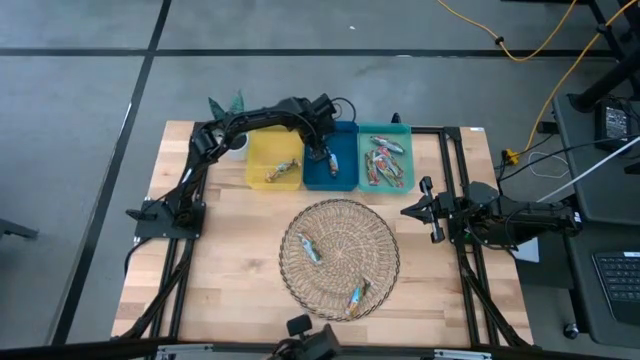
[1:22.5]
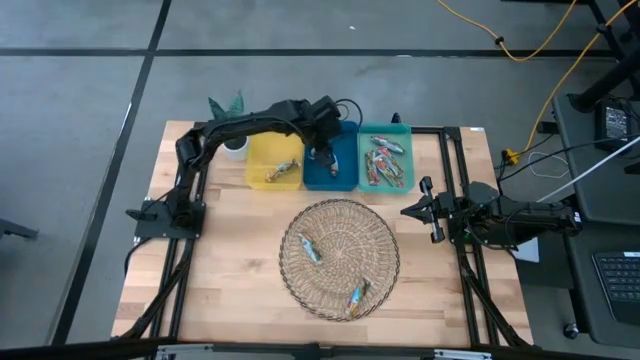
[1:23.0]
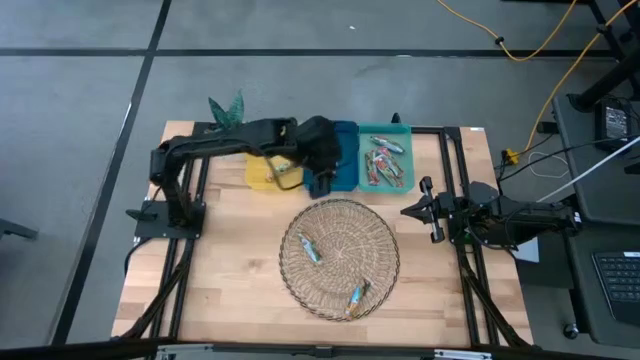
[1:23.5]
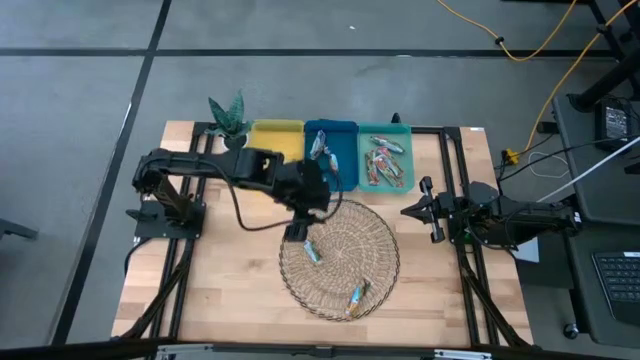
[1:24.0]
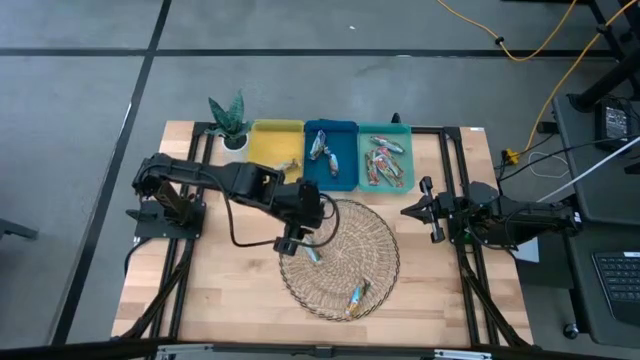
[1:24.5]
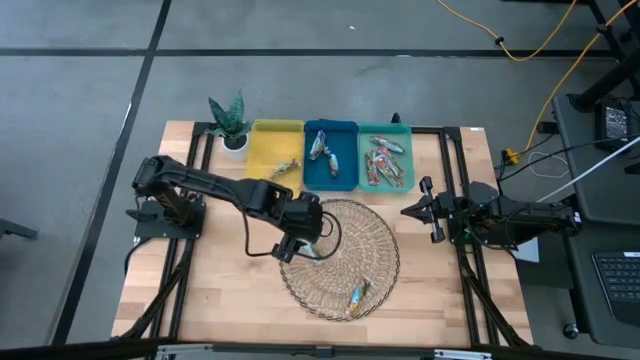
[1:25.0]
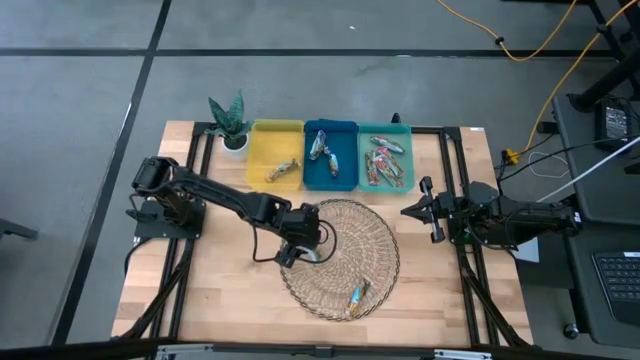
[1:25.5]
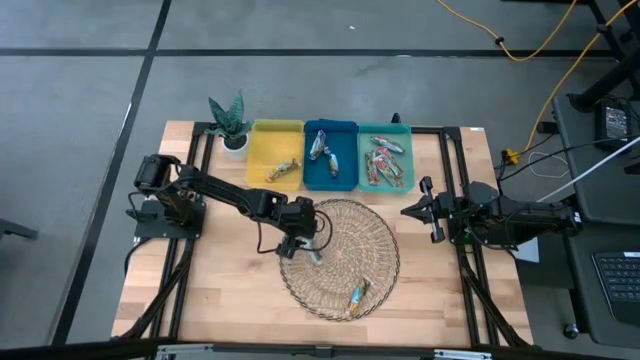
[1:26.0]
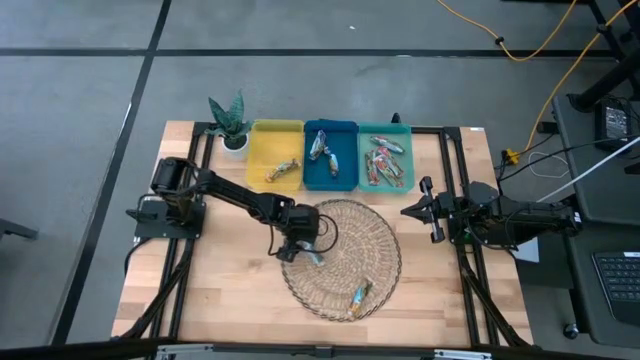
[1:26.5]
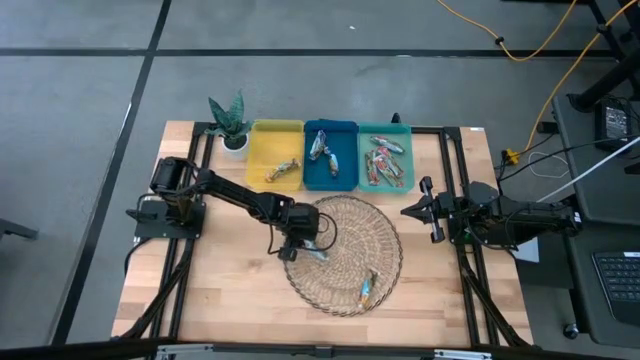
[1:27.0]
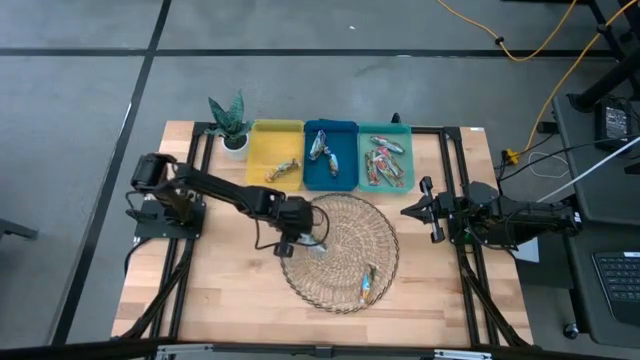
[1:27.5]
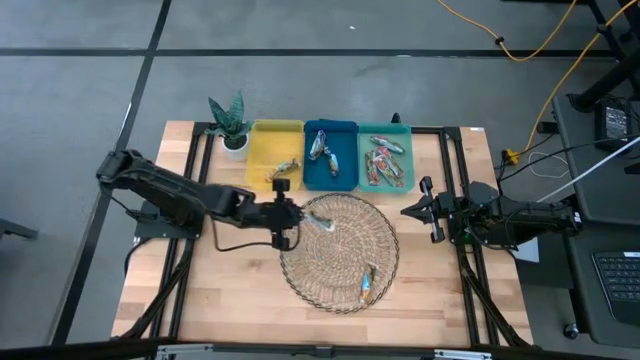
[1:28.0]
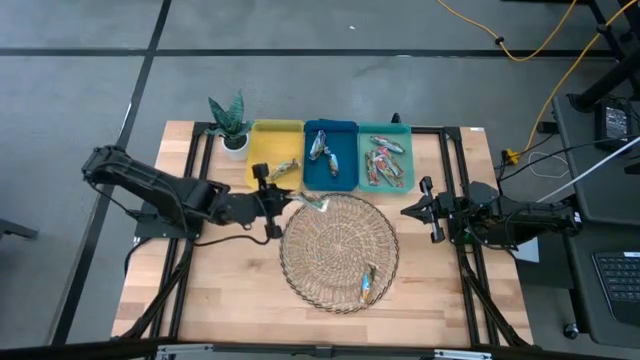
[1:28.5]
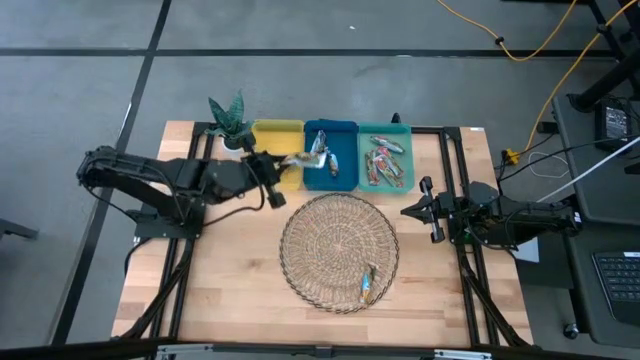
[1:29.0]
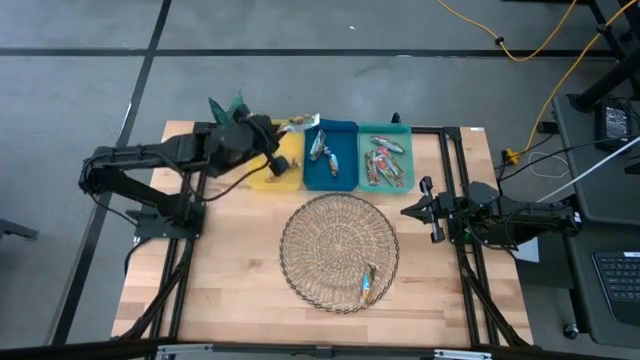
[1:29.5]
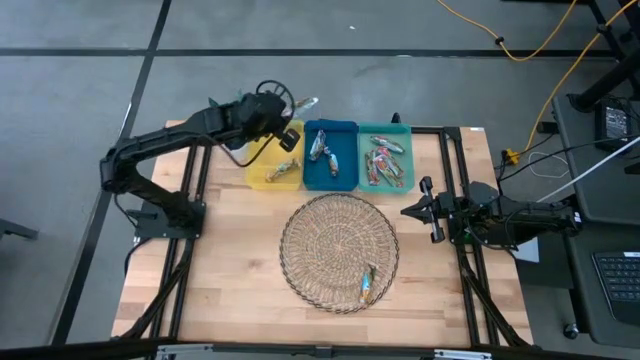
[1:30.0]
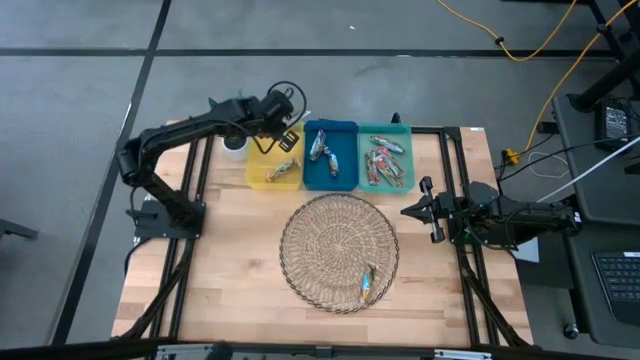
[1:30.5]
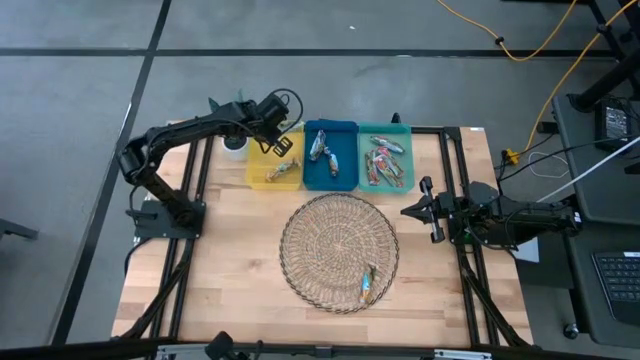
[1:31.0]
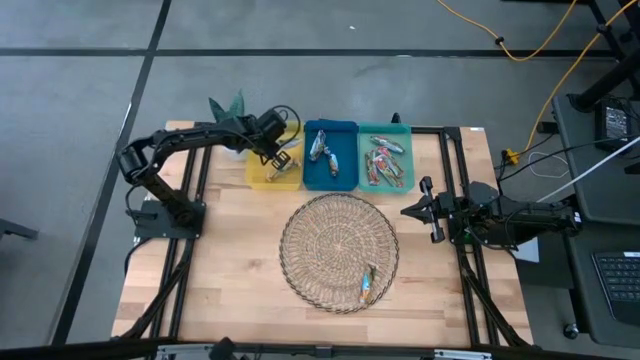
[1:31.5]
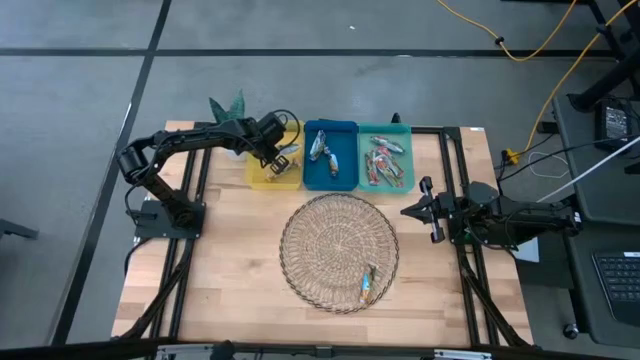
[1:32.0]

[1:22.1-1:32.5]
Task: Pick and place Granola Bars by type
Put the yellow granola bar into the yellow bin

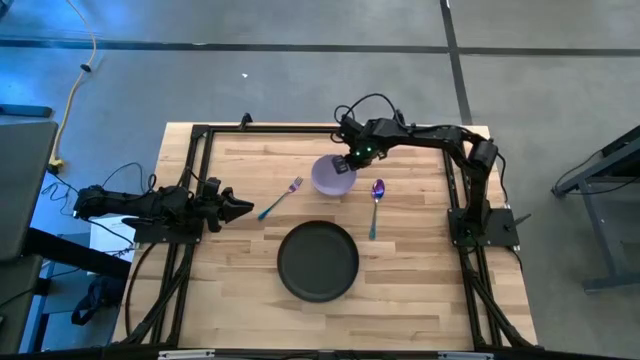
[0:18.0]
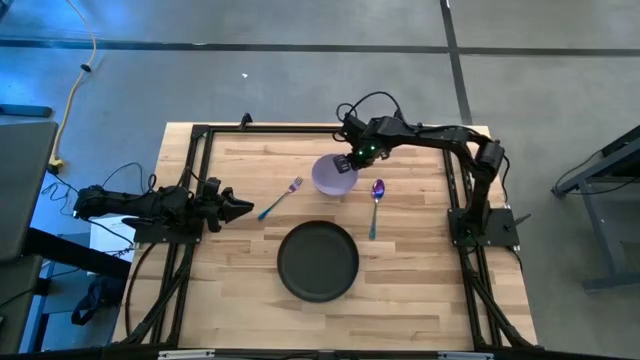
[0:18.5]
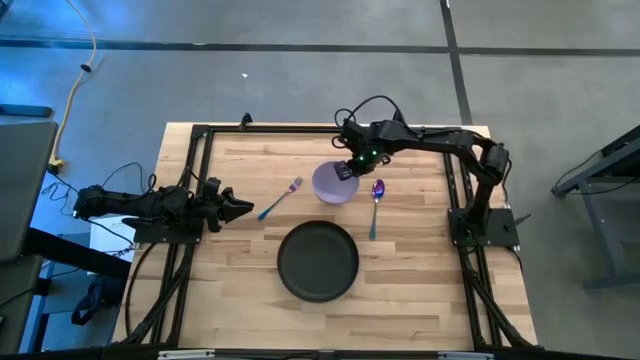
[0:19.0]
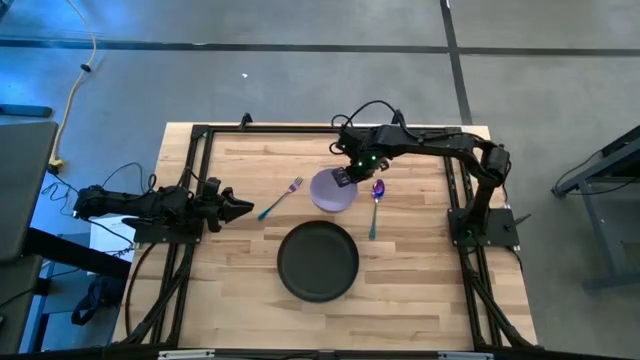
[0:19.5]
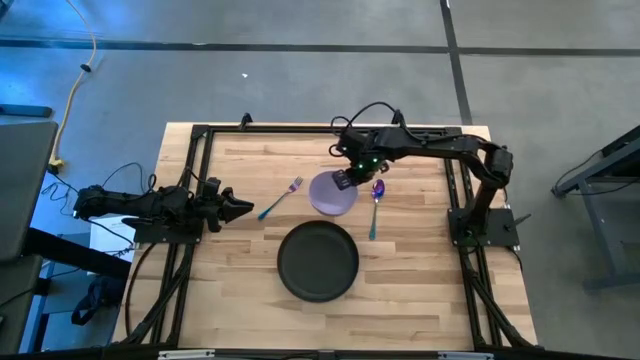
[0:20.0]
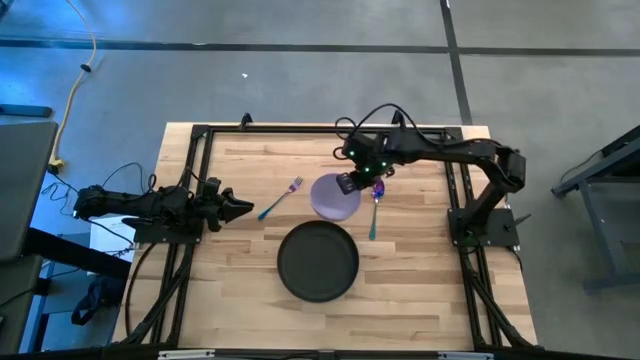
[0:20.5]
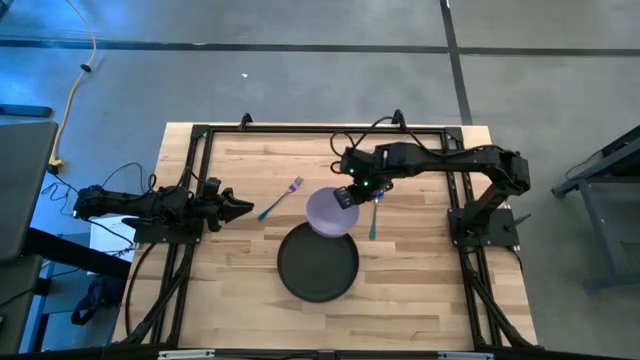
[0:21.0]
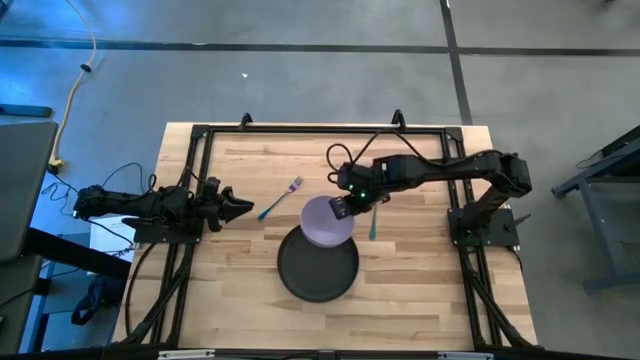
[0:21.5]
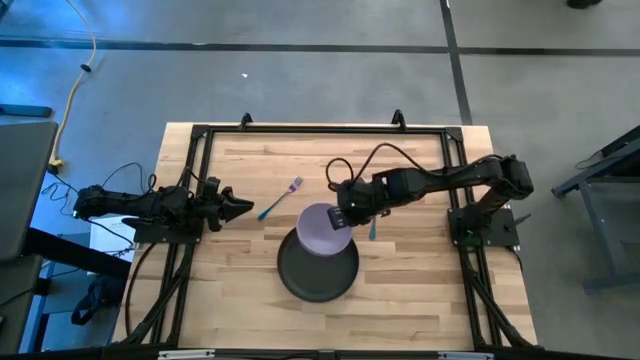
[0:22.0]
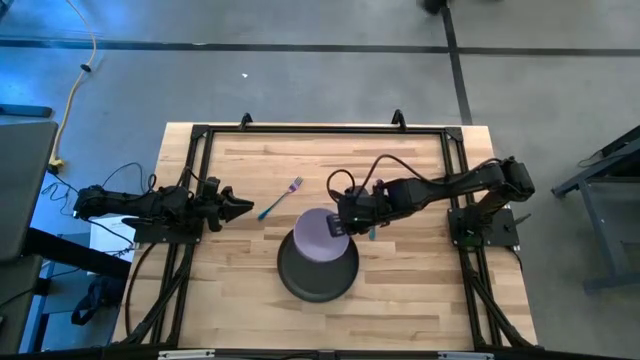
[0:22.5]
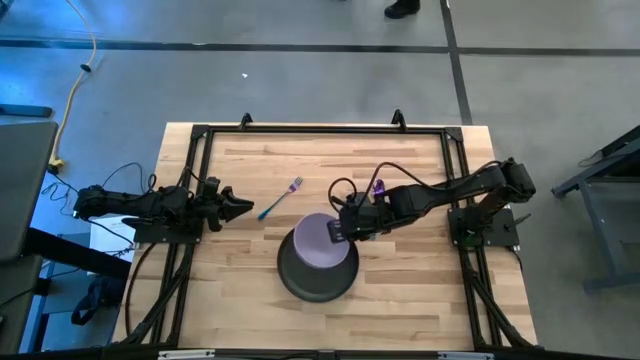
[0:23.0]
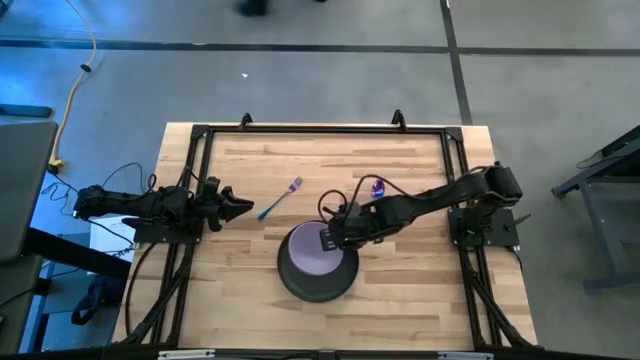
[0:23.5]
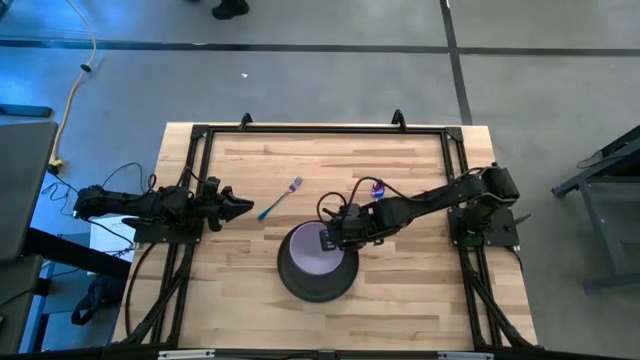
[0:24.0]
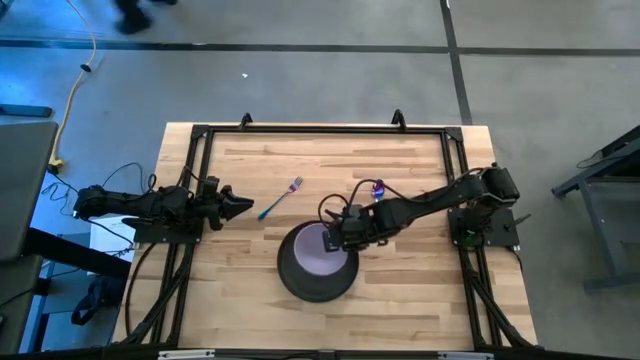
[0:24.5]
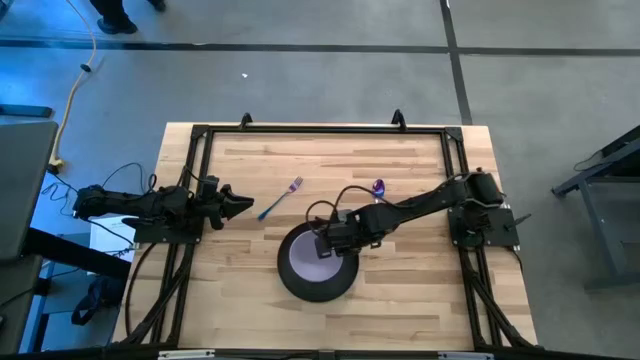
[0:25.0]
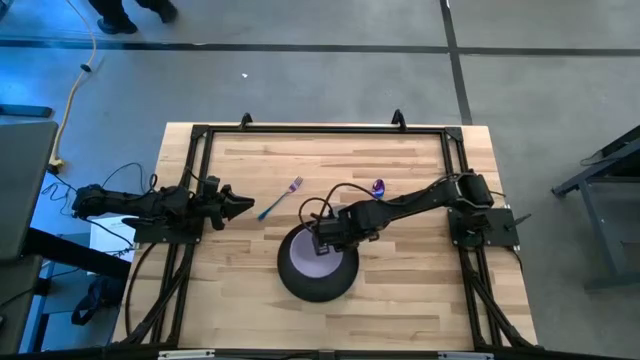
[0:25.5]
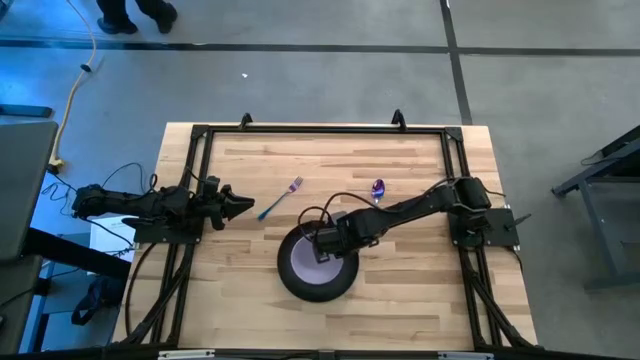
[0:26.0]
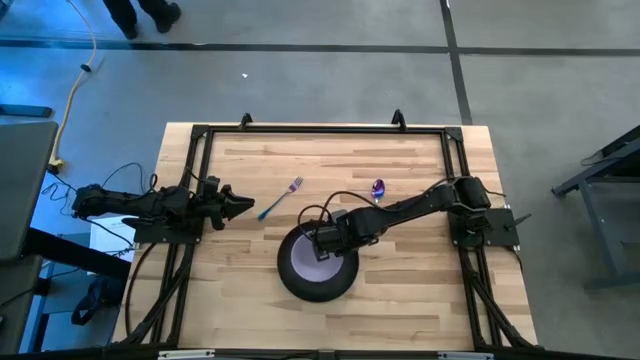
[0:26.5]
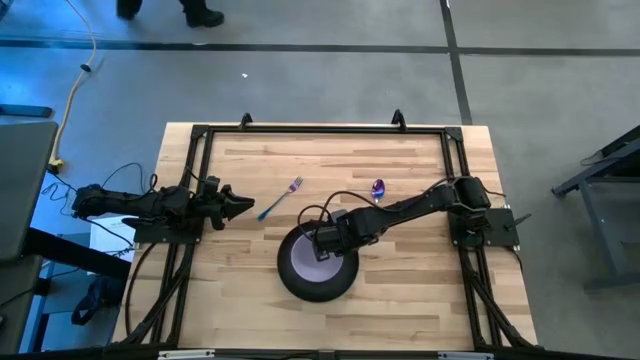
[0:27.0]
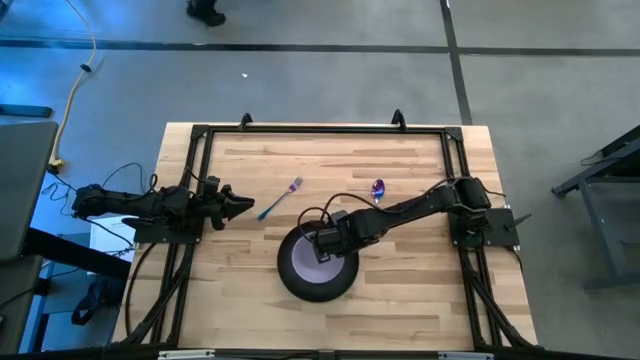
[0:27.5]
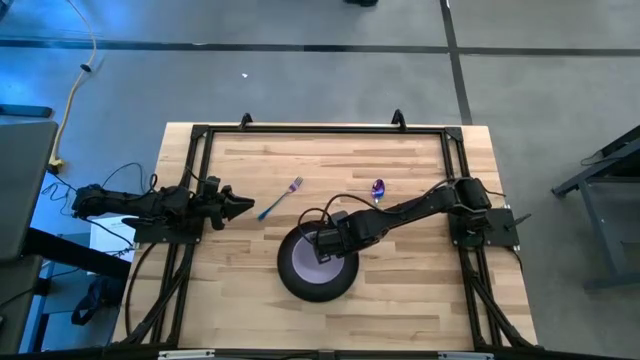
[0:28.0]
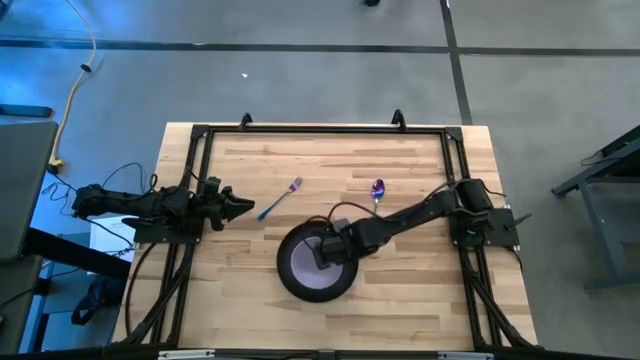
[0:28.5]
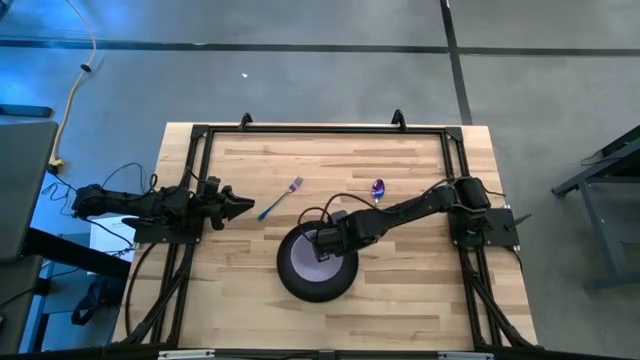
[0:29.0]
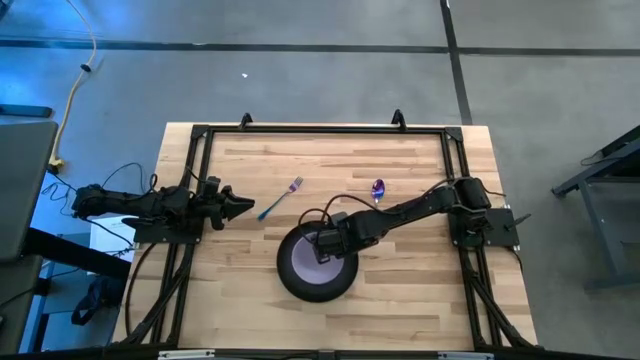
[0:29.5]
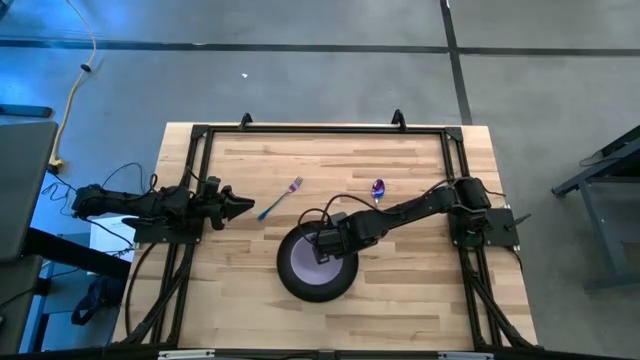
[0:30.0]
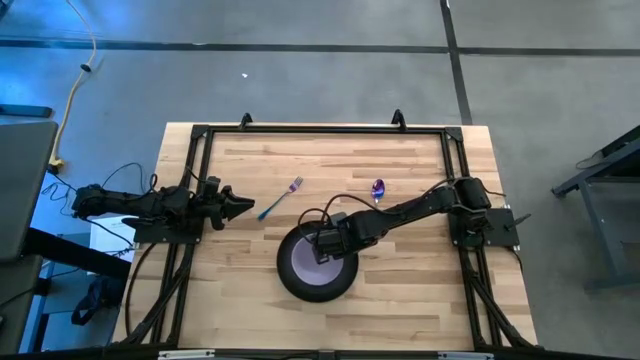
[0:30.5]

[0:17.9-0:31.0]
Task: Set table place
Put the violet bowl on the black plate
